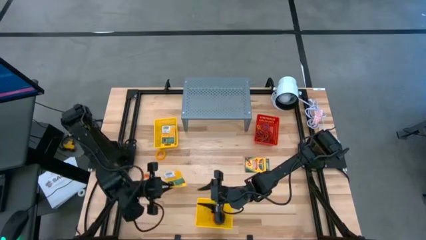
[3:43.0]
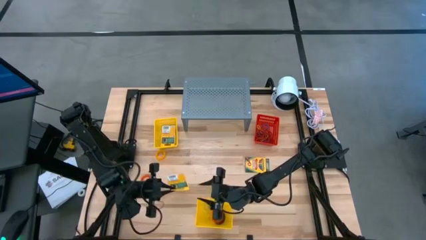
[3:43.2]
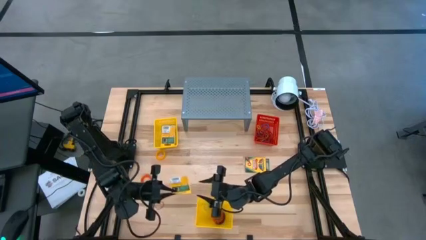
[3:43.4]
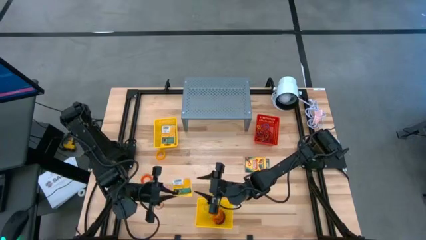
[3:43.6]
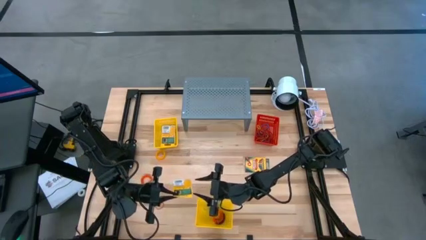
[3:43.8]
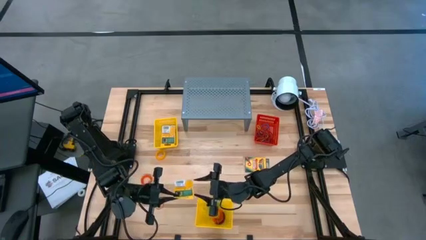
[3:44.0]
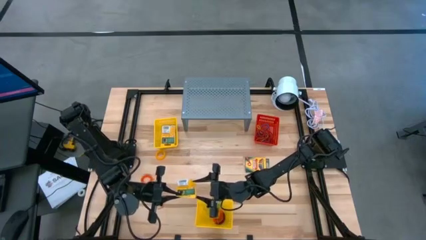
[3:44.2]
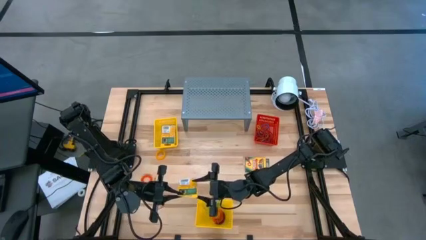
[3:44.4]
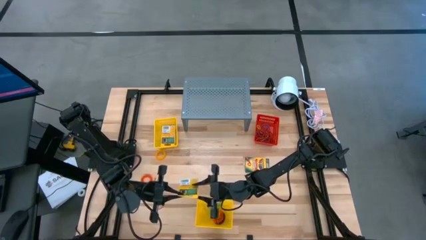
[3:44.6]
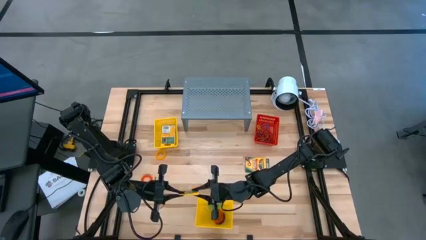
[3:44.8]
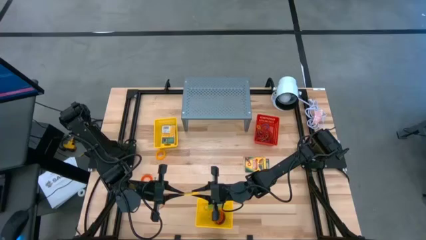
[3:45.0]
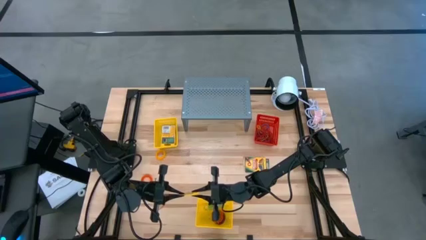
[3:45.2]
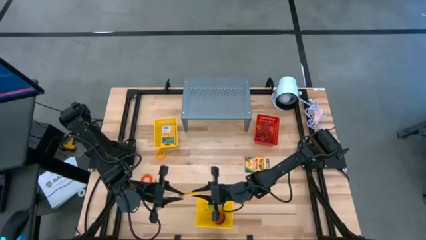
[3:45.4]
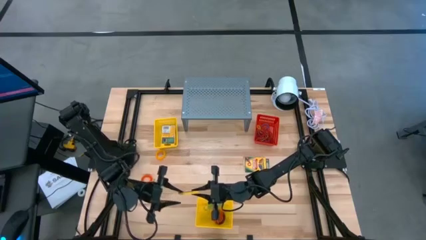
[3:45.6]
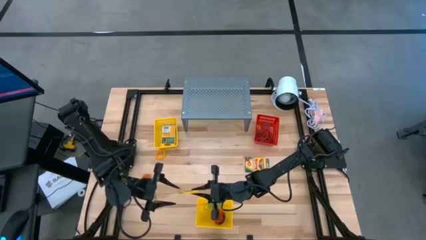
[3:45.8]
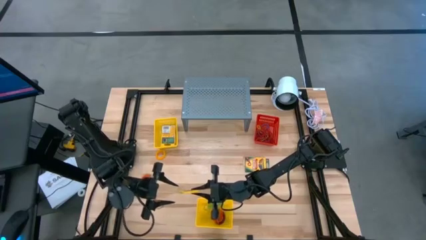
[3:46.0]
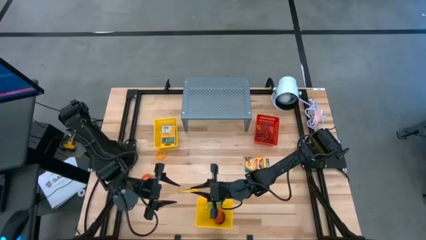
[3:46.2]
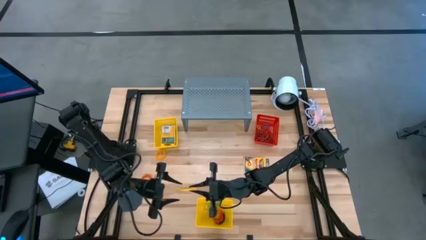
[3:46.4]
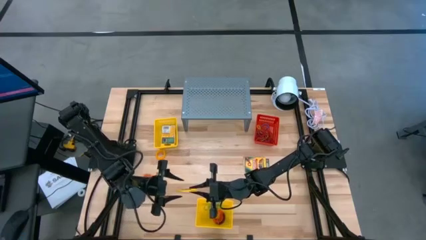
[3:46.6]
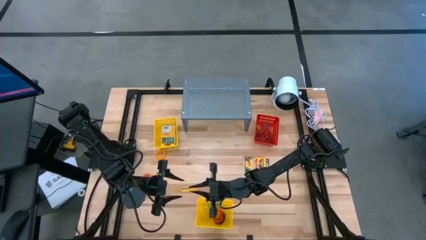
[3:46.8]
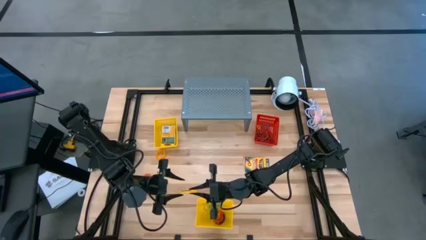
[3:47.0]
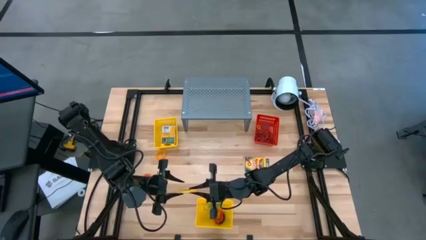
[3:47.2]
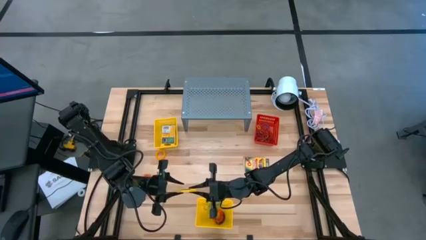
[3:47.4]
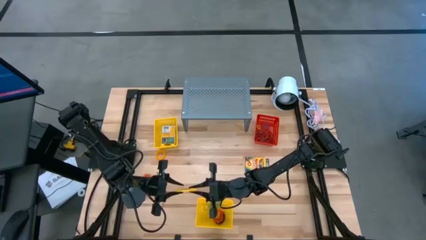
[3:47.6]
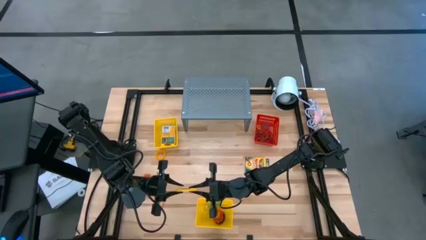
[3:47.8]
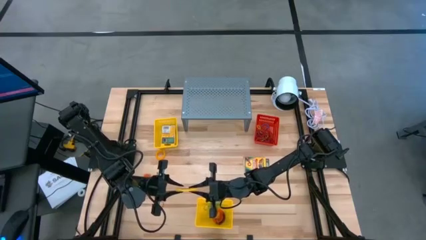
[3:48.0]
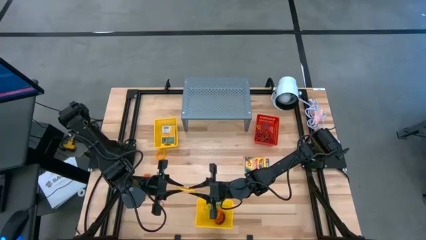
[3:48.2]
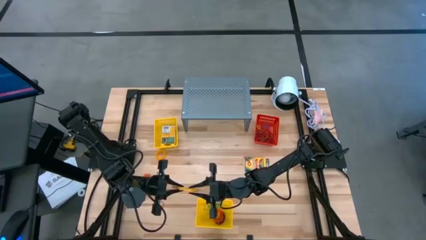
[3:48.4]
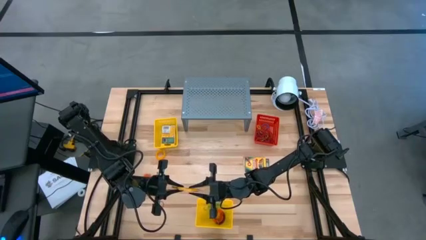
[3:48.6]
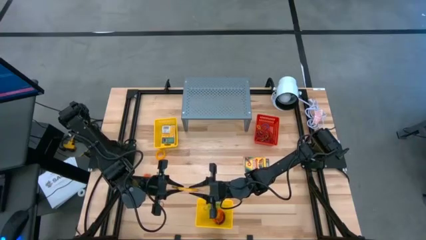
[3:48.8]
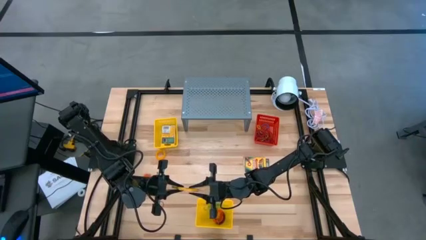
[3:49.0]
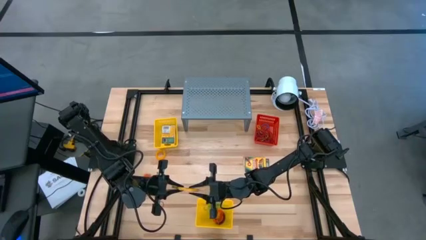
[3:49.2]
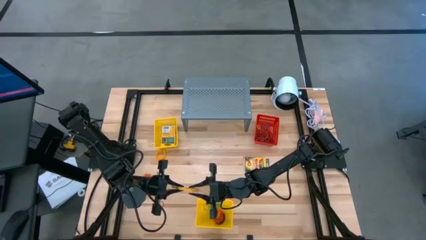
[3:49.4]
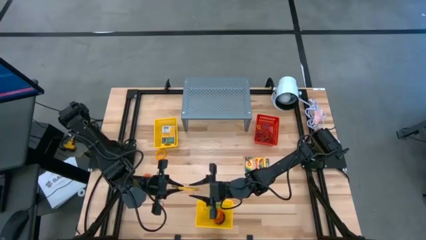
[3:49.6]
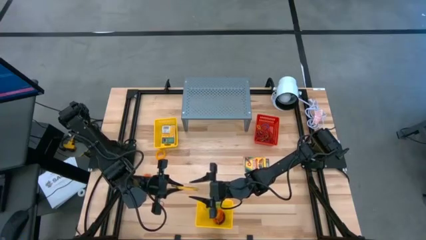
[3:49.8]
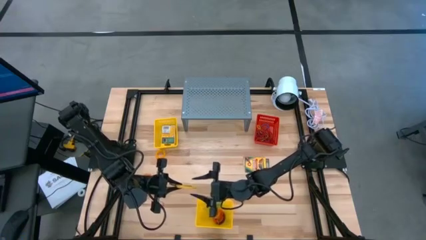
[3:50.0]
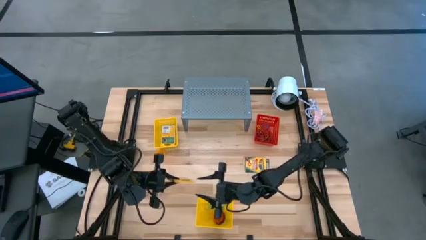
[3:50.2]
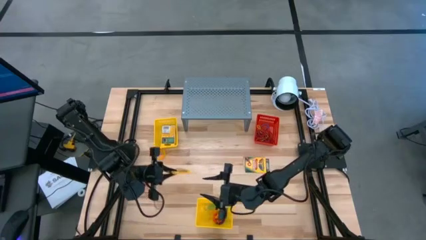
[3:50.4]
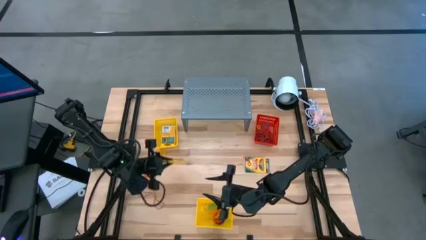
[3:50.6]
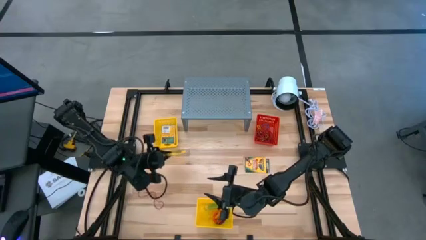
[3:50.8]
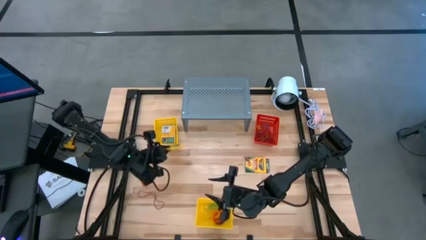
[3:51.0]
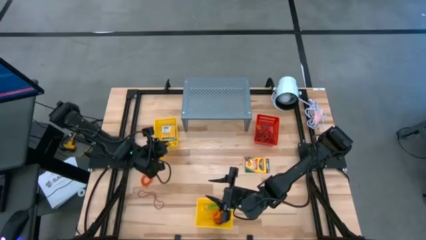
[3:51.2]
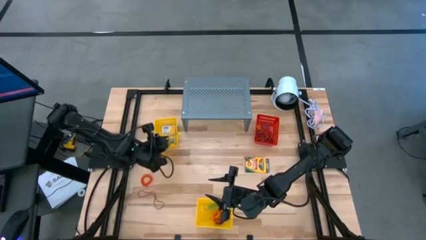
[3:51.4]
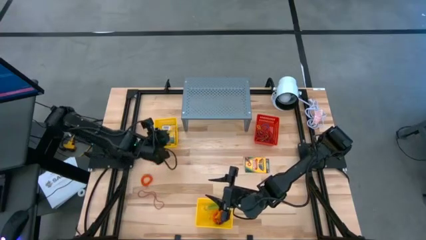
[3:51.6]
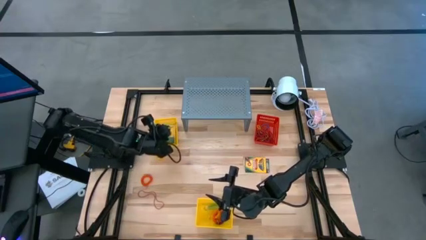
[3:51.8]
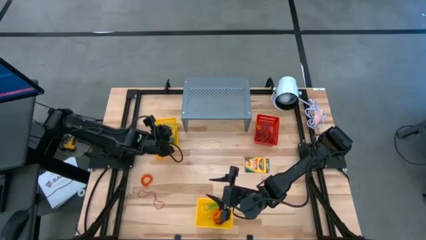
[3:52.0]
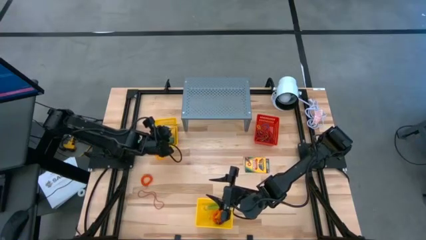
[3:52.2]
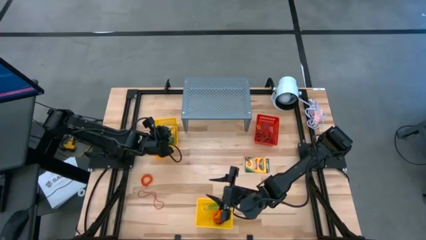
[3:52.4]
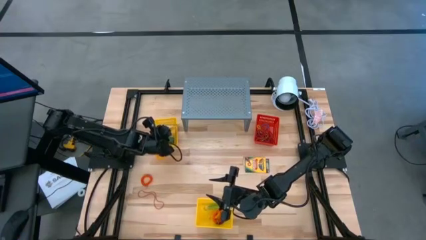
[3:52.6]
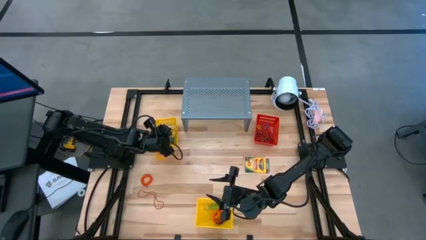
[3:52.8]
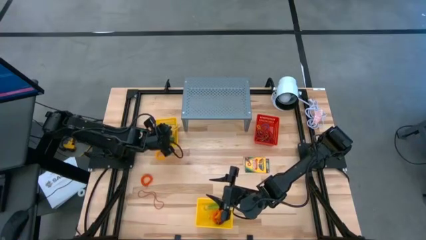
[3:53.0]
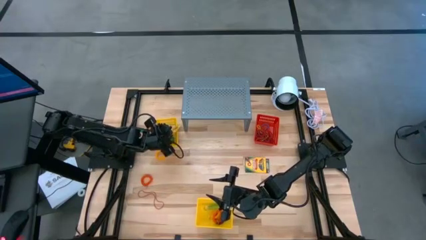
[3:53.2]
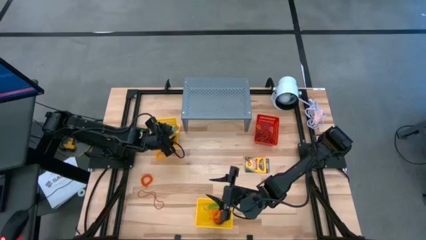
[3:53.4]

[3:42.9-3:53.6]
Task: Pick & Place Office Desk Supplies
Put the yellow crayon box into the top yellow bin
